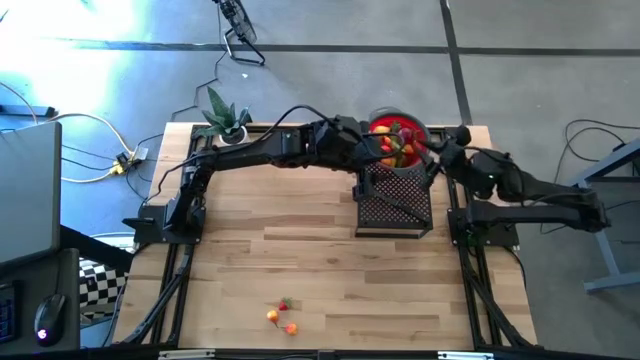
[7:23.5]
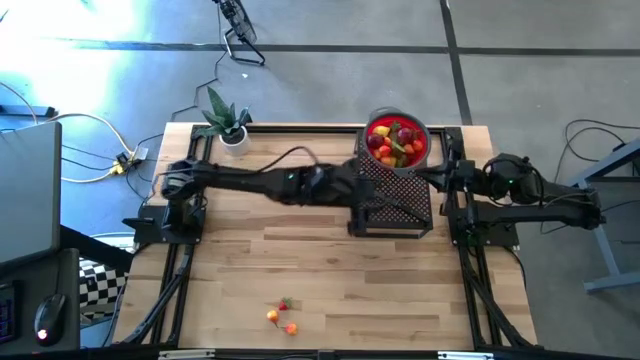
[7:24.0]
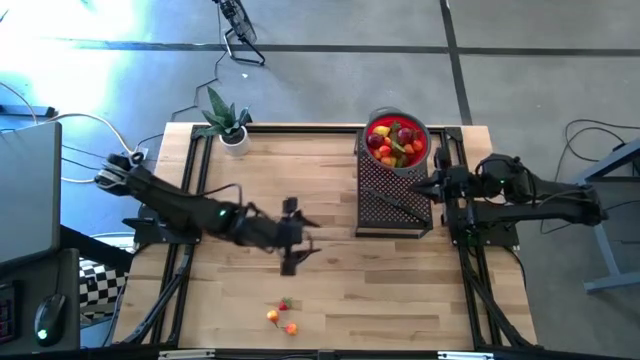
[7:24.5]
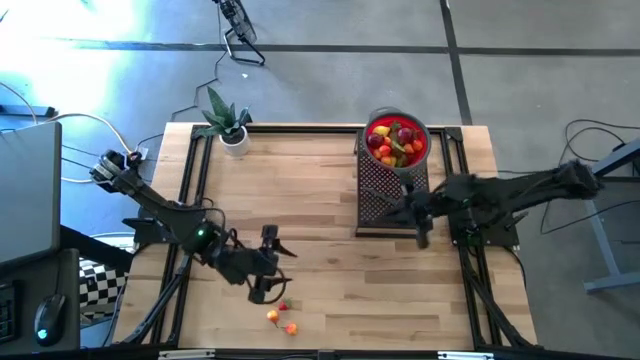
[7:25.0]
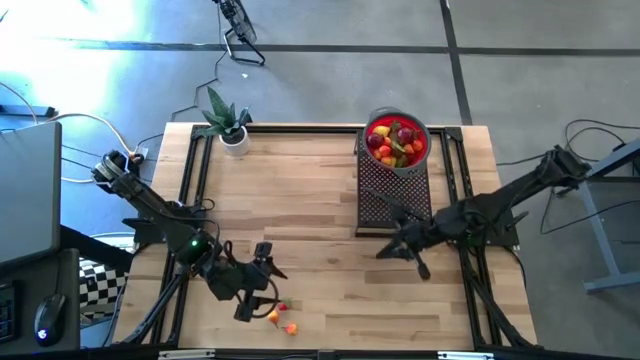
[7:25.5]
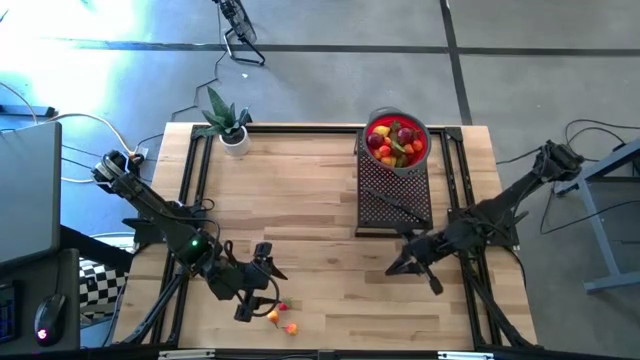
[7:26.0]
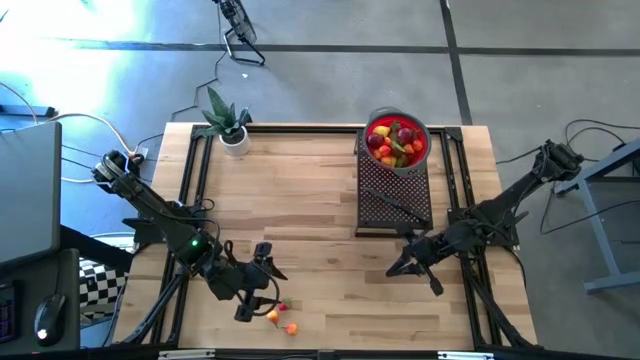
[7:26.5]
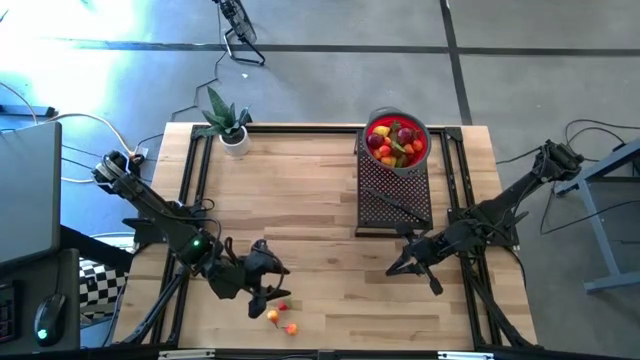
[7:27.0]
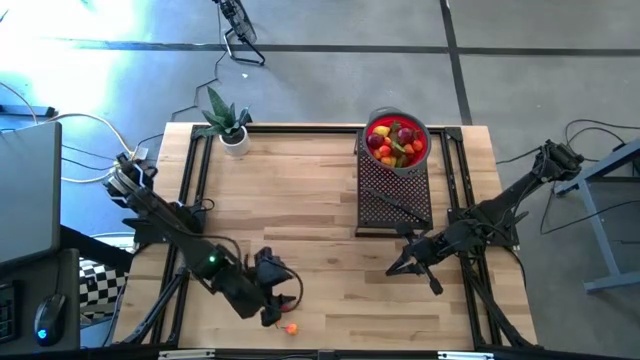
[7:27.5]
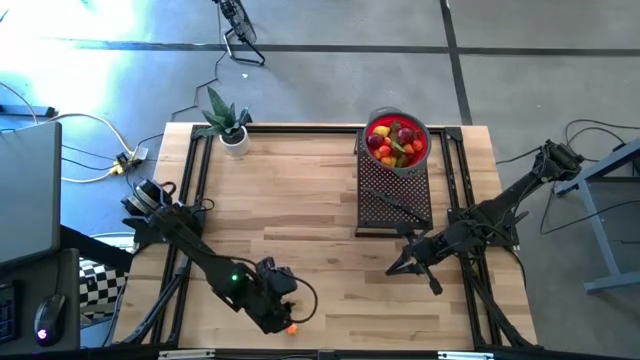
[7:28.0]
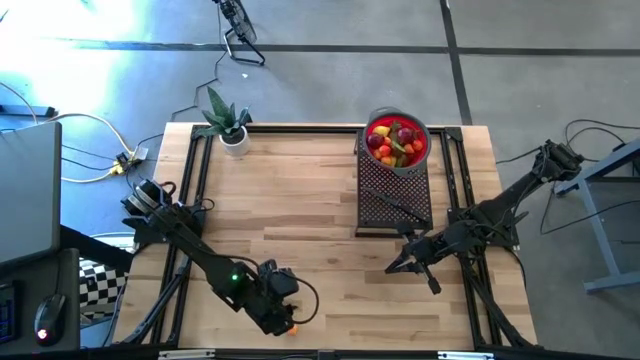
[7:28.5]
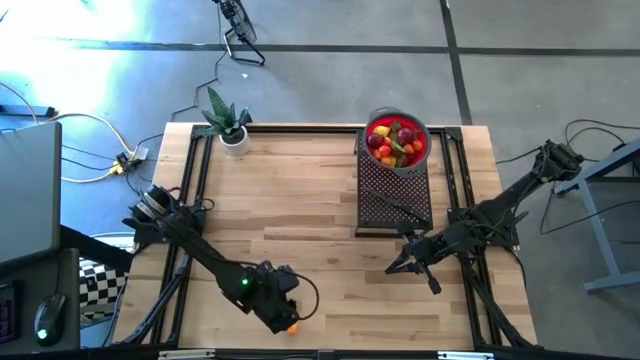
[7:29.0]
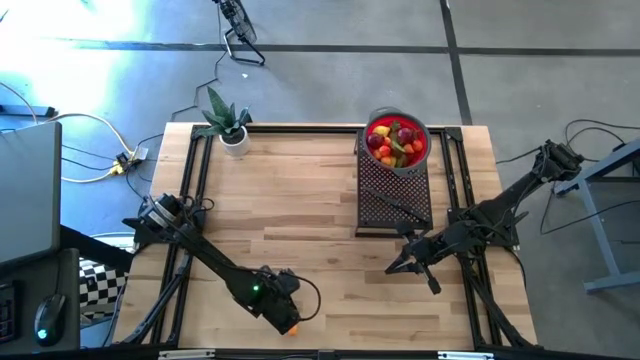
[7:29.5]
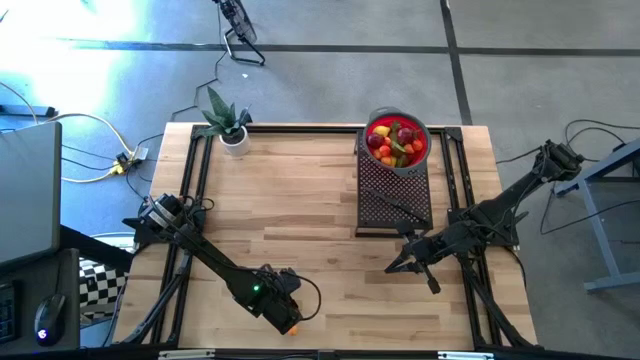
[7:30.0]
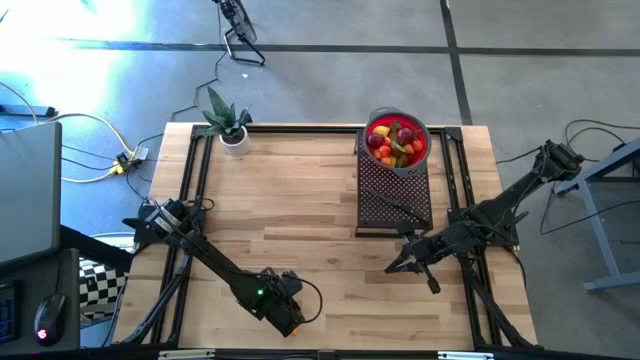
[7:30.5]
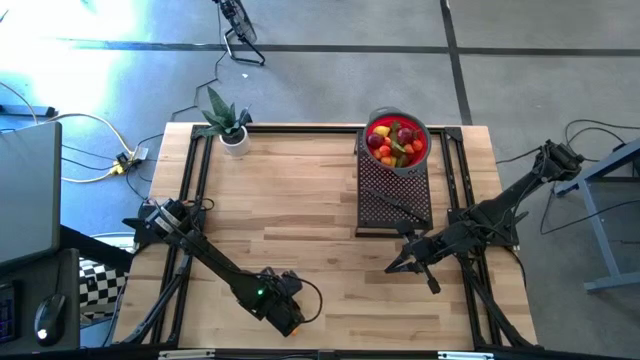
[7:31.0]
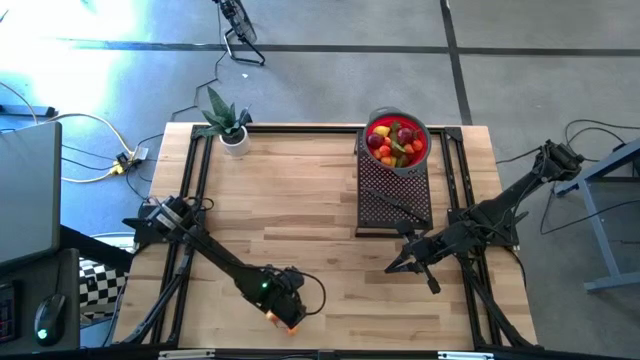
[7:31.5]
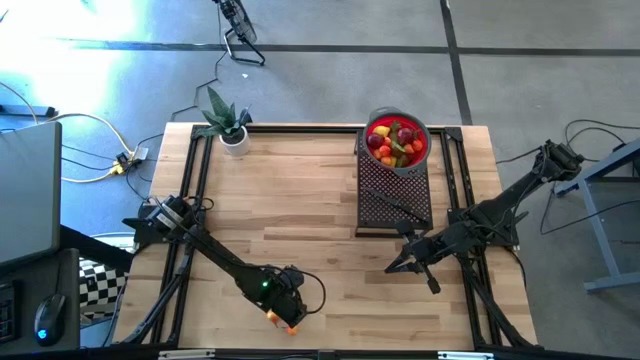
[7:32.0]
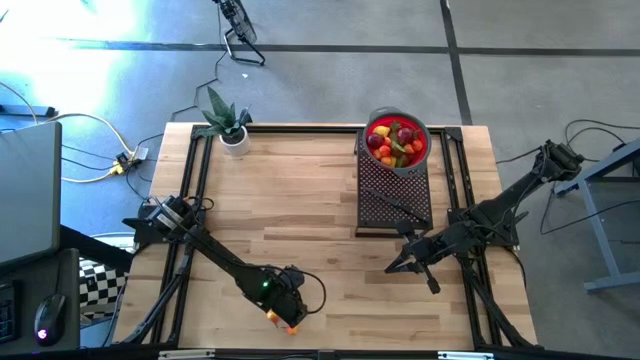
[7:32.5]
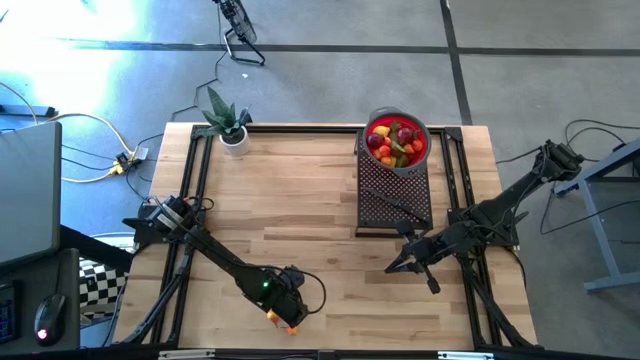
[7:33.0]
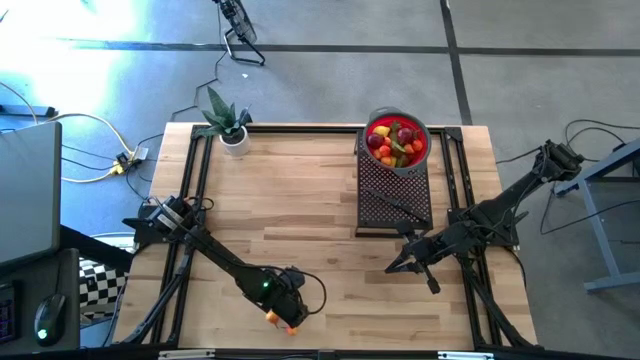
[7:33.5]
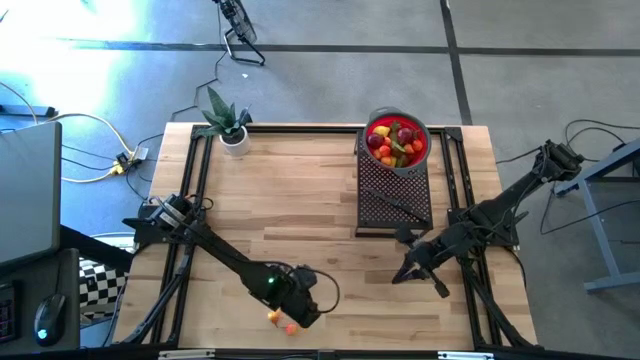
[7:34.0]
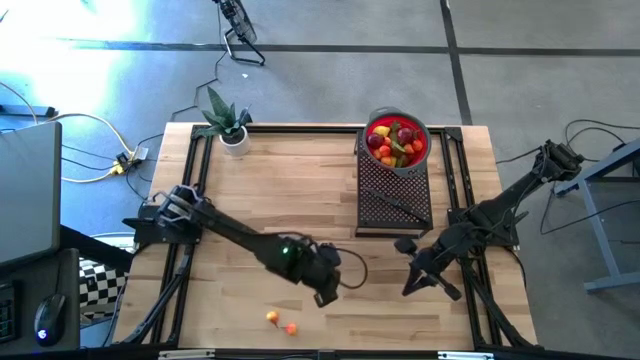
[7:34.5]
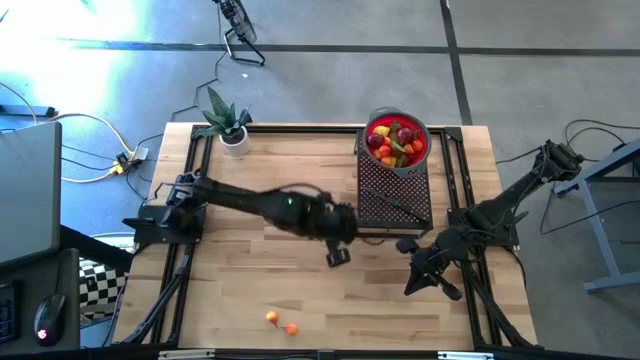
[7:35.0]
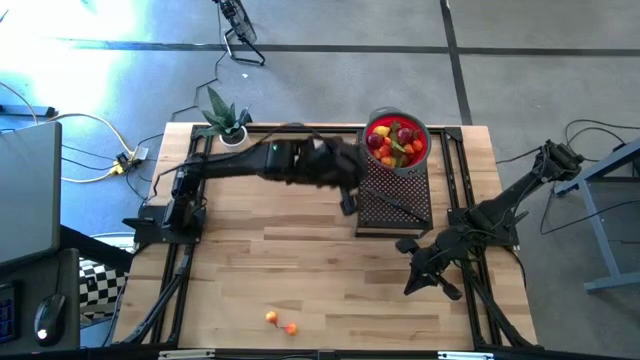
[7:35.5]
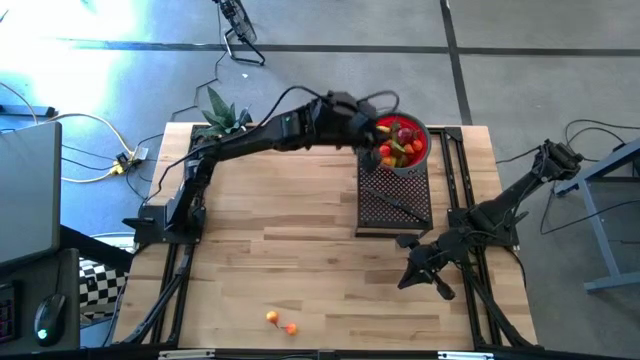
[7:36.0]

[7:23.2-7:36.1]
Task: Pick & Place Fruit
Put the strawberry into the strainer bowl on the shelf

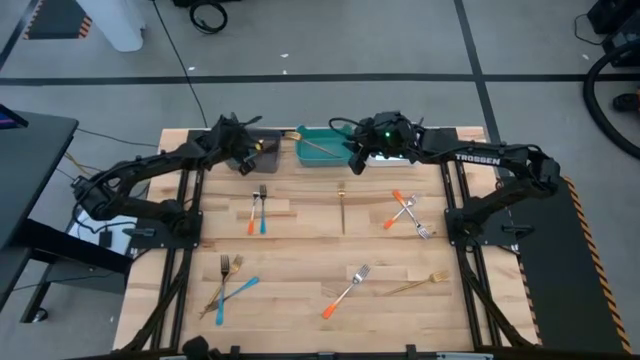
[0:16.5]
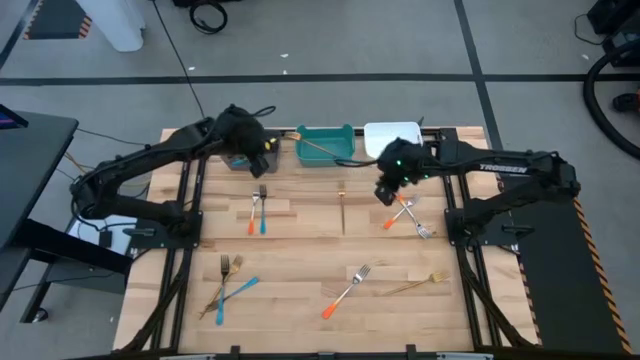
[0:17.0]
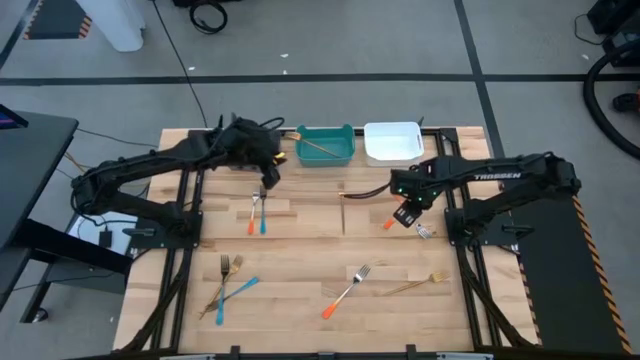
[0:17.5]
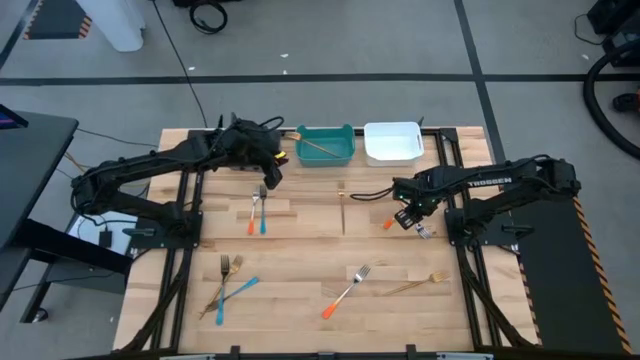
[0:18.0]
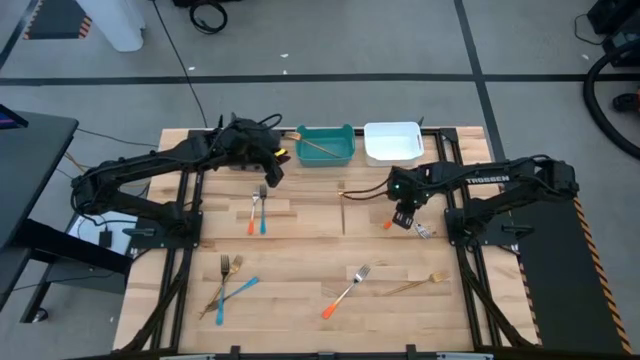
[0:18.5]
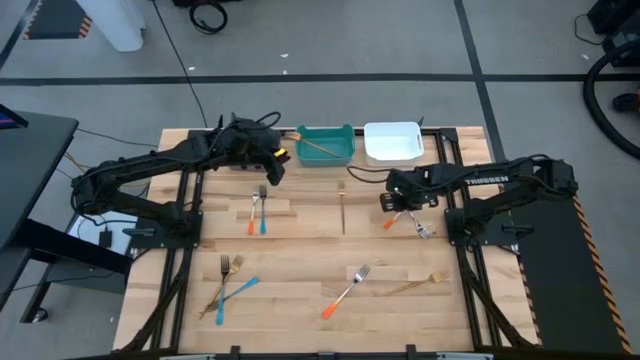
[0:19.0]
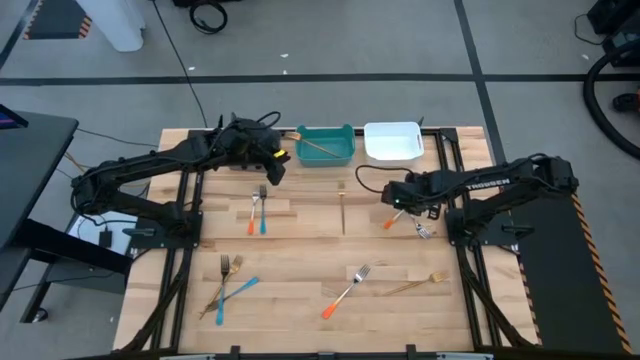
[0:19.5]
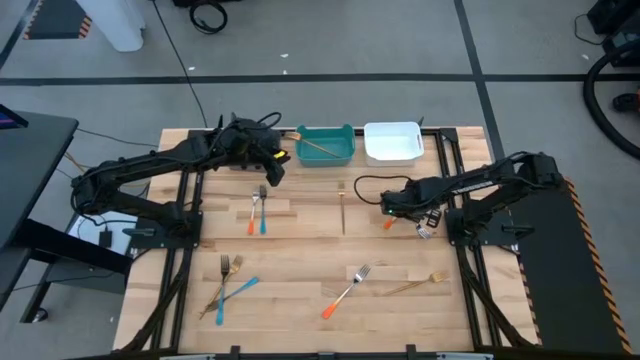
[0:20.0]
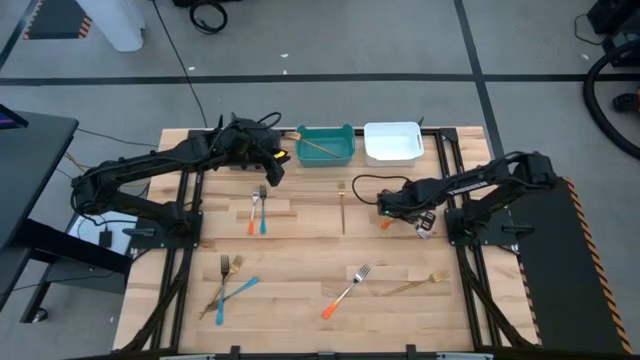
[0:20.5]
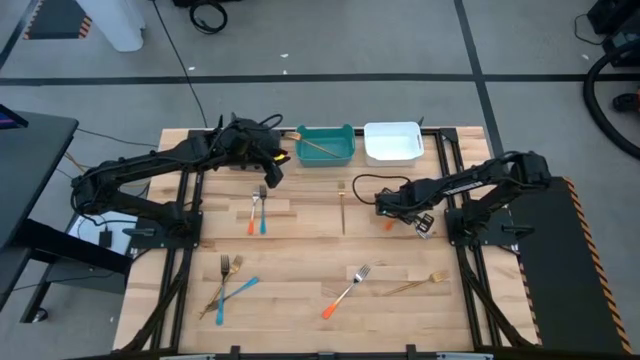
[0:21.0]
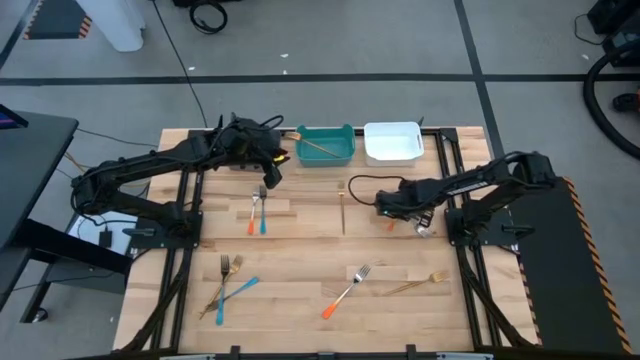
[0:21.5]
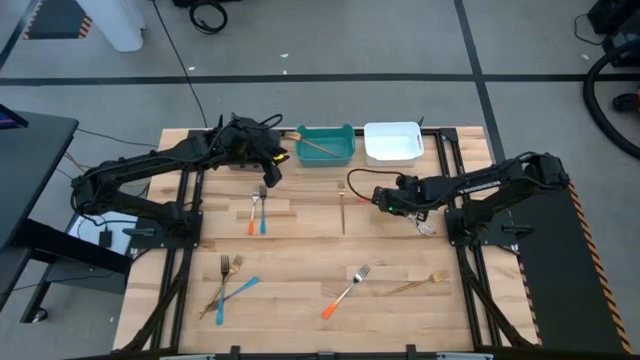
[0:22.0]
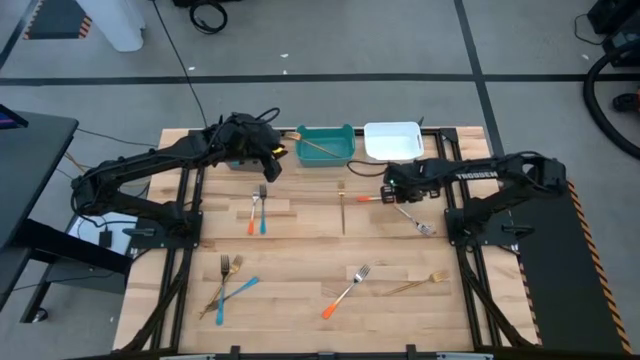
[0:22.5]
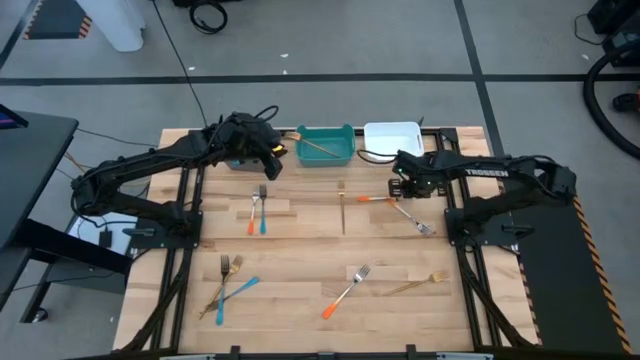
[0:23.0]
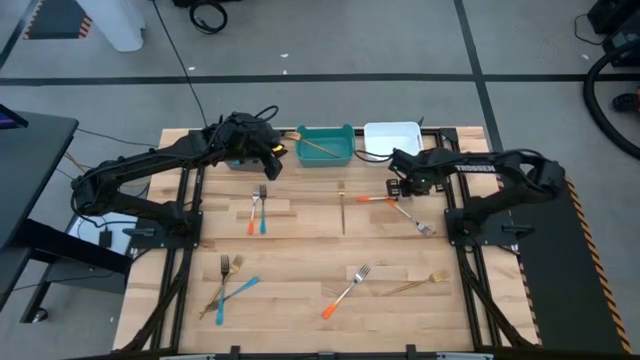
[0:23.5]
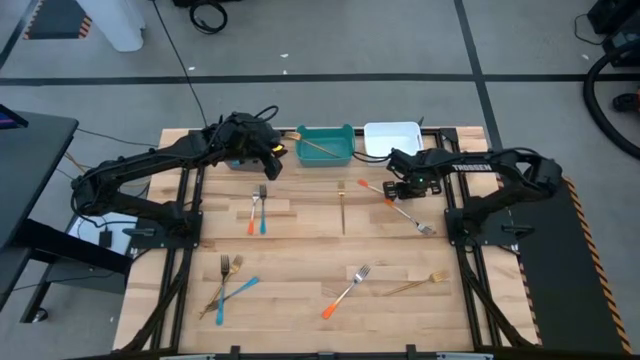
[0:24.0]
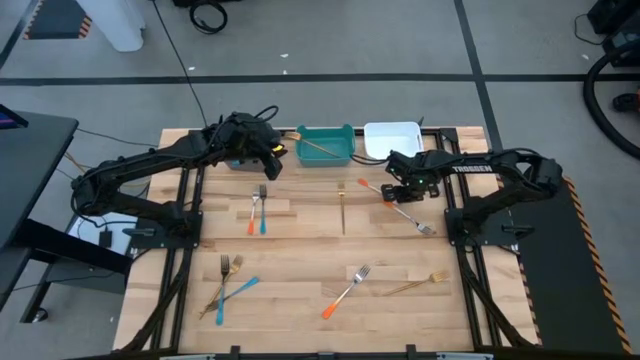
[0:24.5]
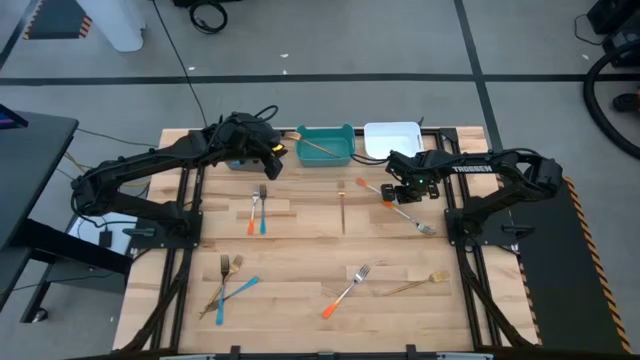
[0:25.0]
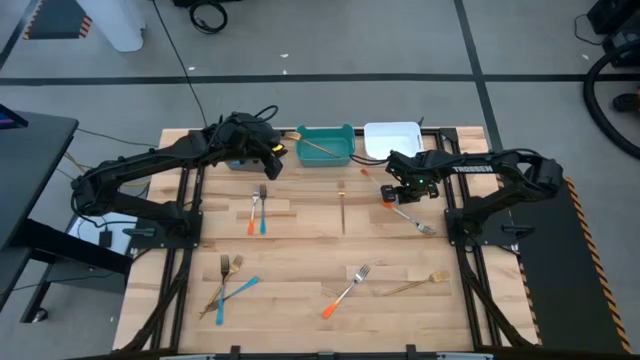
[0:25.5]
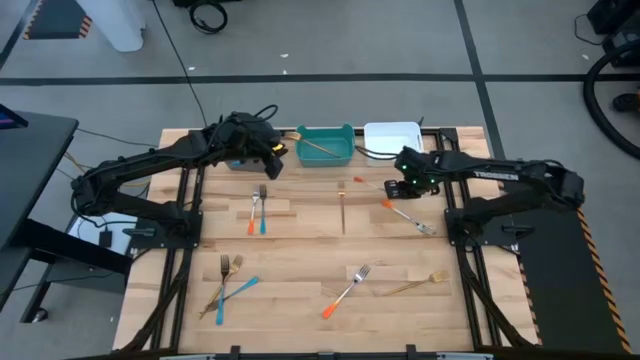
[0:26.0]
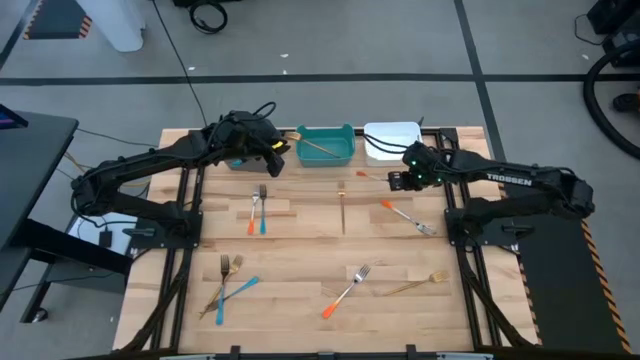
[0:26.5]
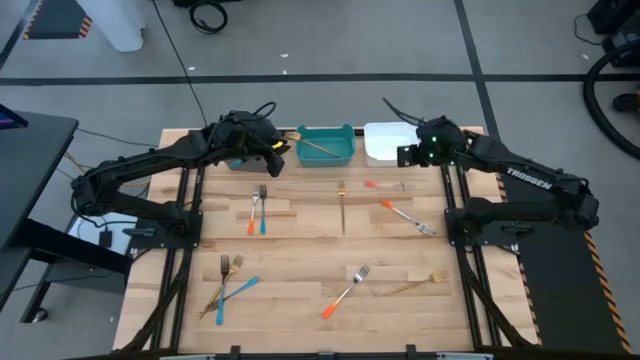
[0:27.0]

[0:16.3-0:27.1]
Task: Sort silverware by color (type)
Put the orange fork into the white bin
